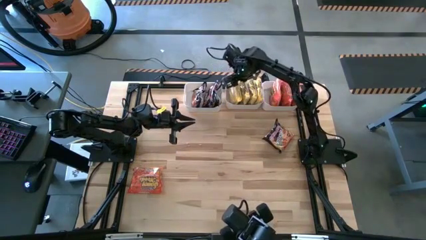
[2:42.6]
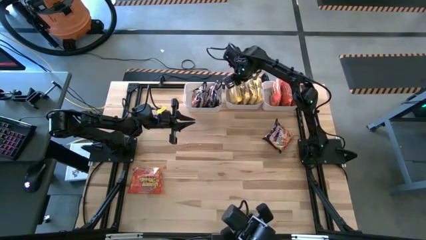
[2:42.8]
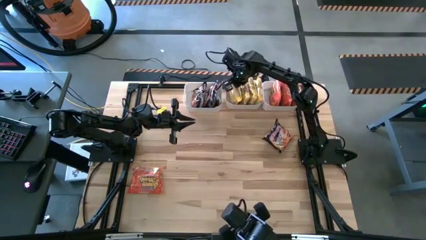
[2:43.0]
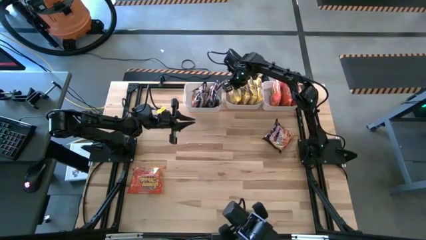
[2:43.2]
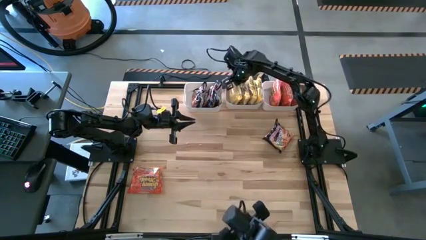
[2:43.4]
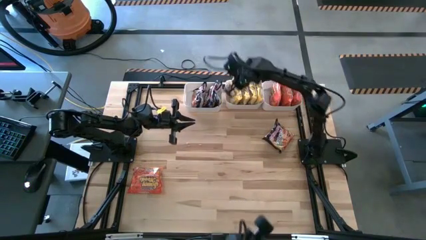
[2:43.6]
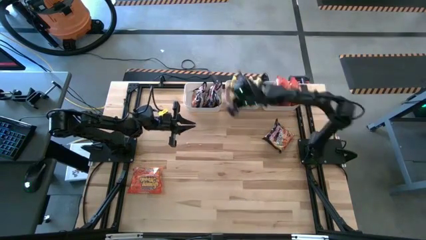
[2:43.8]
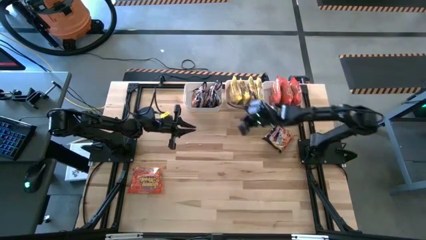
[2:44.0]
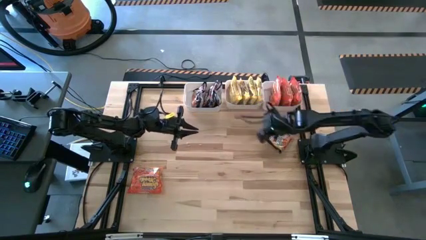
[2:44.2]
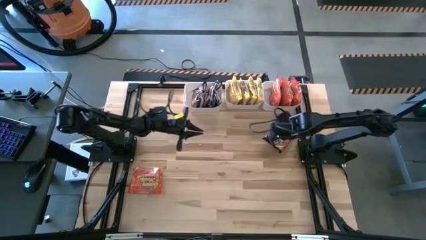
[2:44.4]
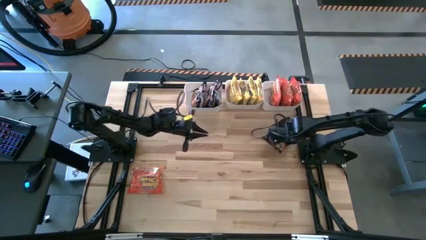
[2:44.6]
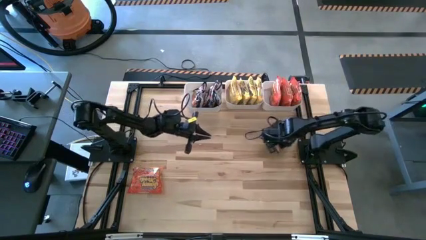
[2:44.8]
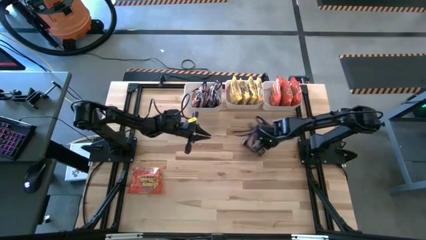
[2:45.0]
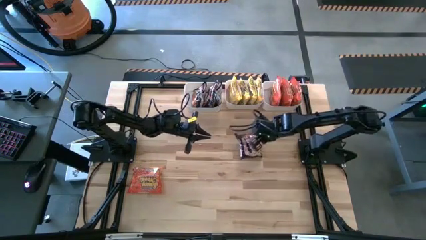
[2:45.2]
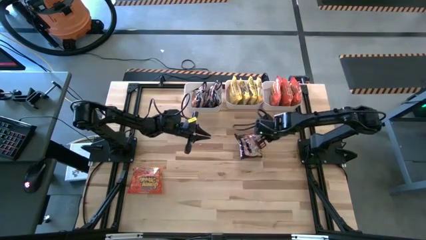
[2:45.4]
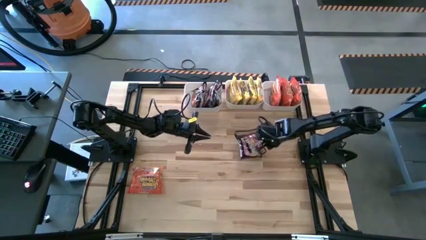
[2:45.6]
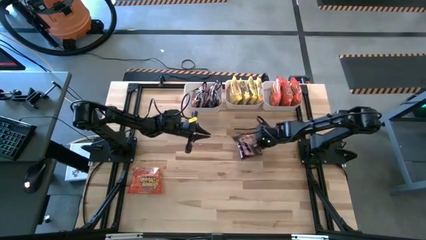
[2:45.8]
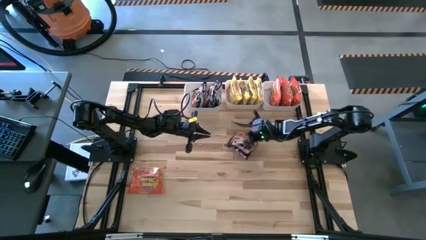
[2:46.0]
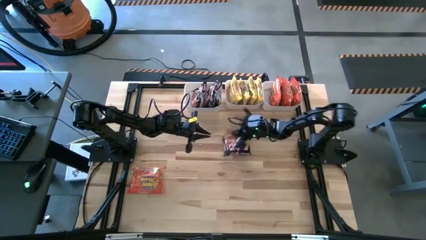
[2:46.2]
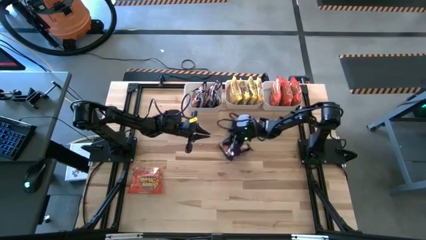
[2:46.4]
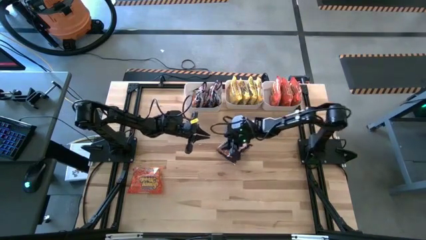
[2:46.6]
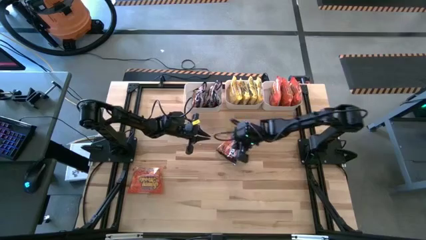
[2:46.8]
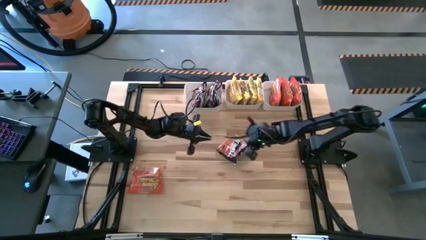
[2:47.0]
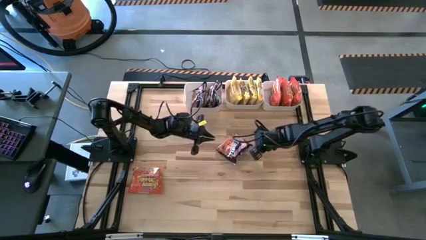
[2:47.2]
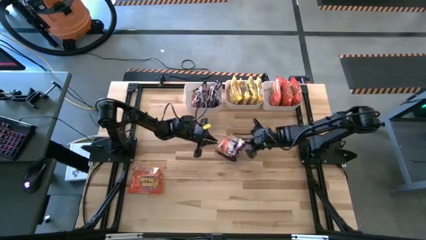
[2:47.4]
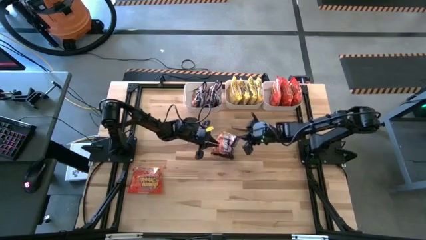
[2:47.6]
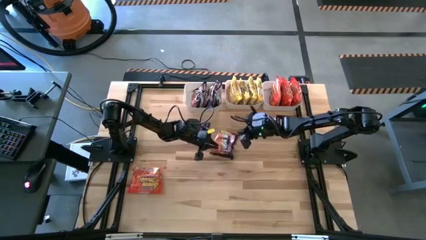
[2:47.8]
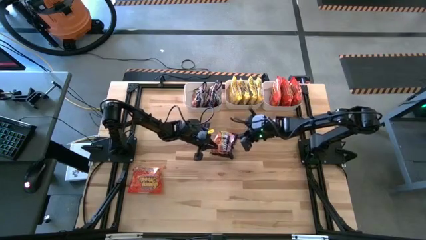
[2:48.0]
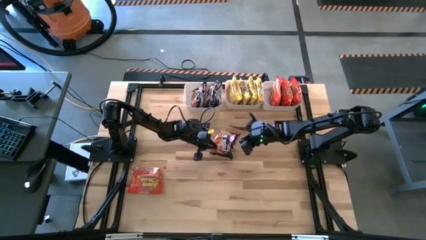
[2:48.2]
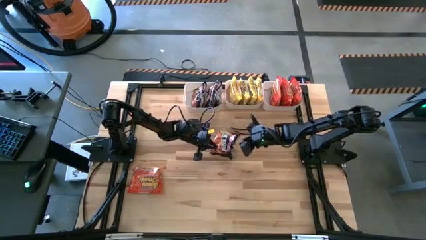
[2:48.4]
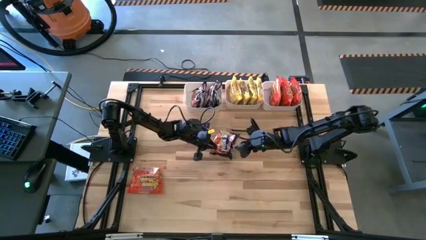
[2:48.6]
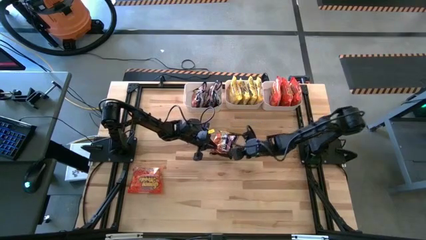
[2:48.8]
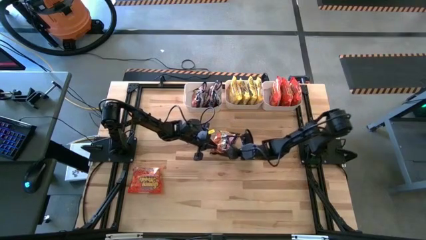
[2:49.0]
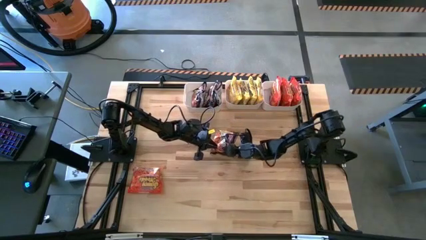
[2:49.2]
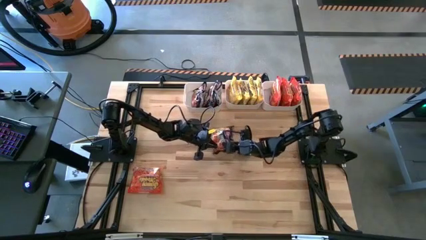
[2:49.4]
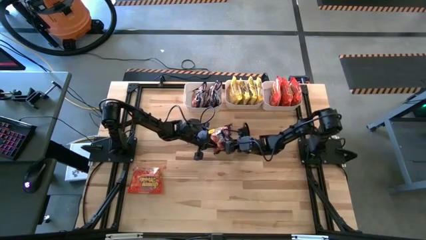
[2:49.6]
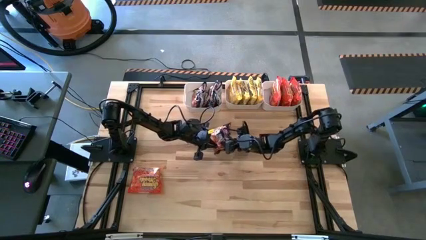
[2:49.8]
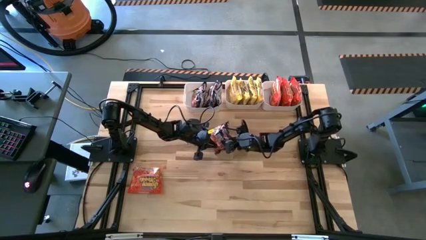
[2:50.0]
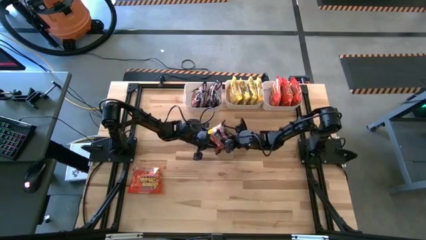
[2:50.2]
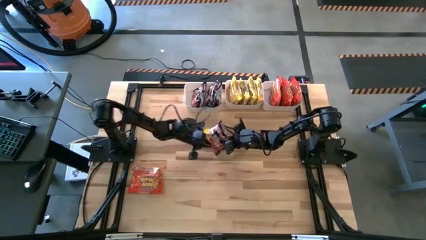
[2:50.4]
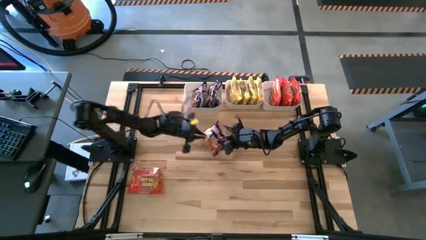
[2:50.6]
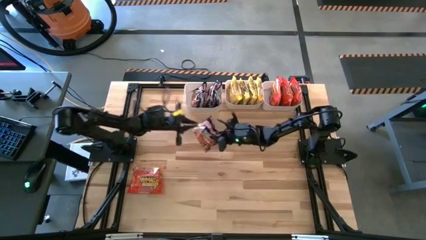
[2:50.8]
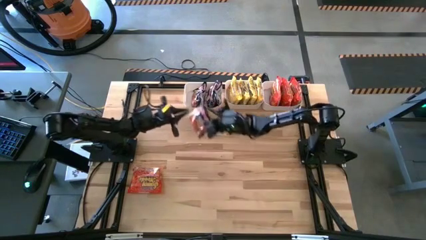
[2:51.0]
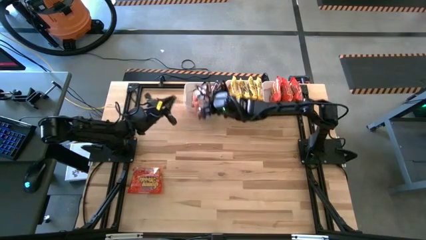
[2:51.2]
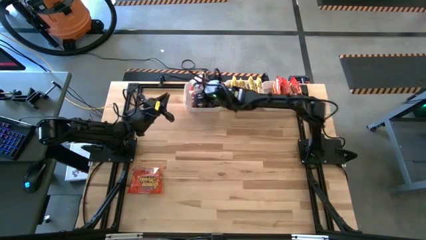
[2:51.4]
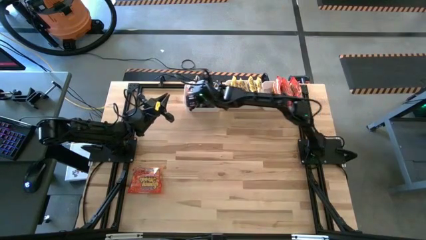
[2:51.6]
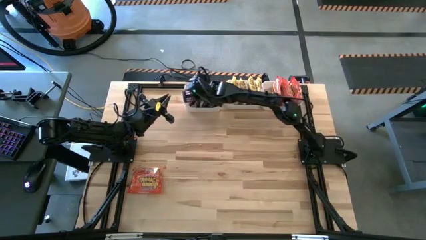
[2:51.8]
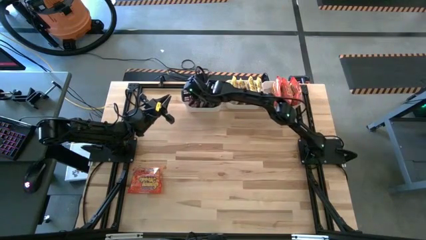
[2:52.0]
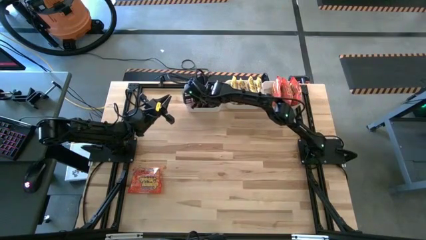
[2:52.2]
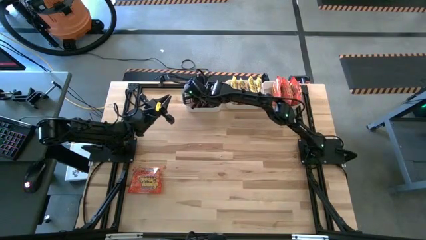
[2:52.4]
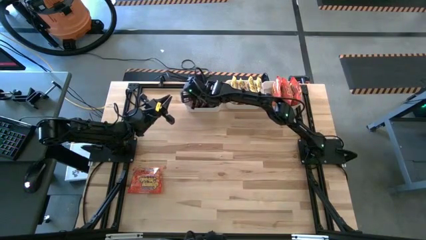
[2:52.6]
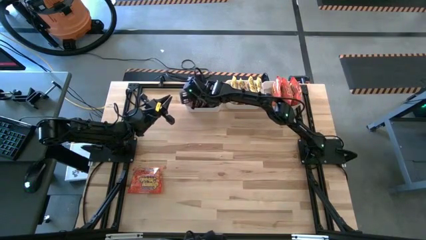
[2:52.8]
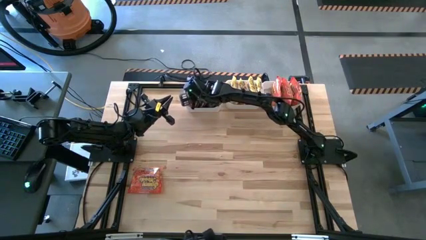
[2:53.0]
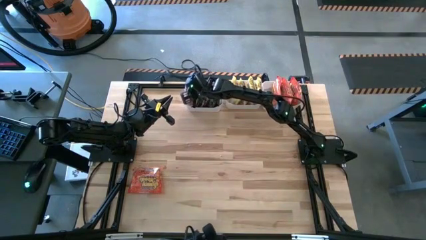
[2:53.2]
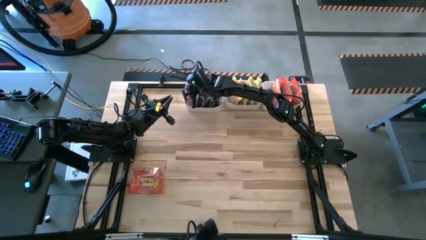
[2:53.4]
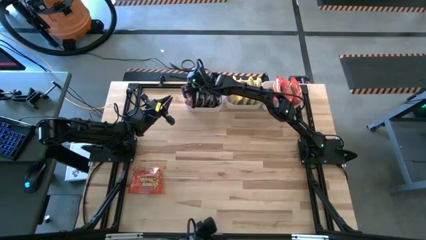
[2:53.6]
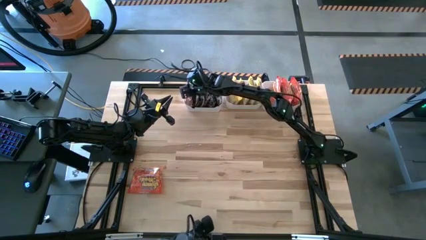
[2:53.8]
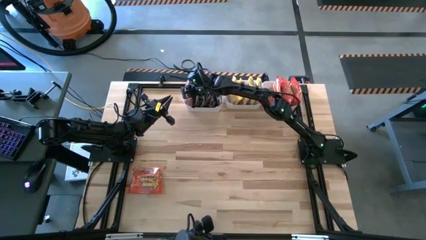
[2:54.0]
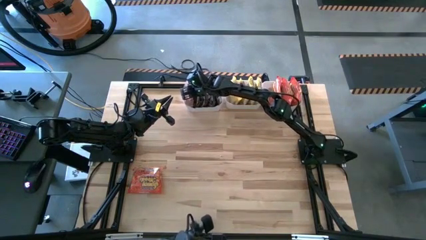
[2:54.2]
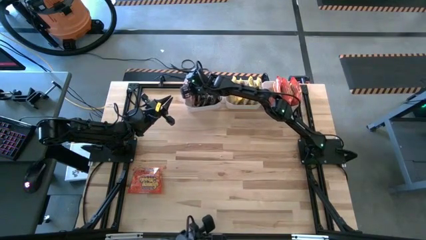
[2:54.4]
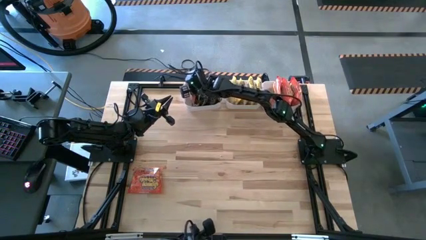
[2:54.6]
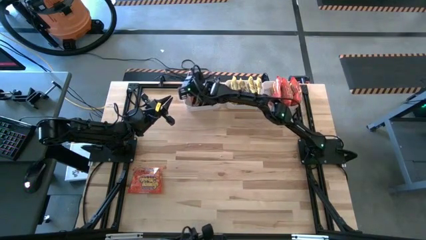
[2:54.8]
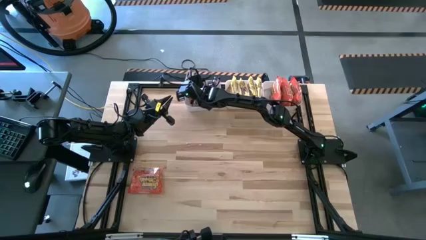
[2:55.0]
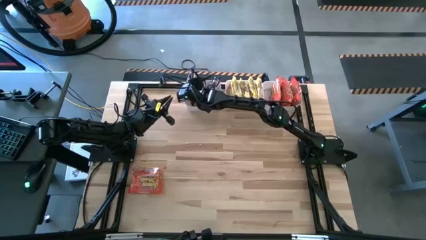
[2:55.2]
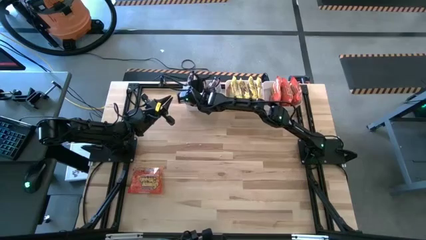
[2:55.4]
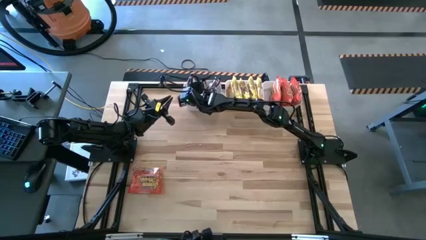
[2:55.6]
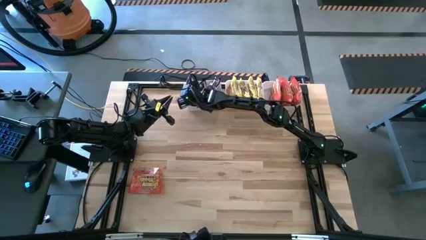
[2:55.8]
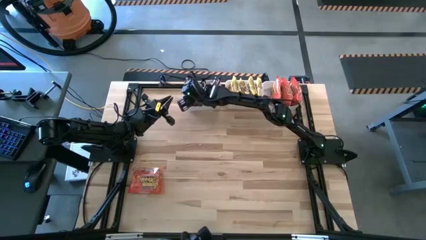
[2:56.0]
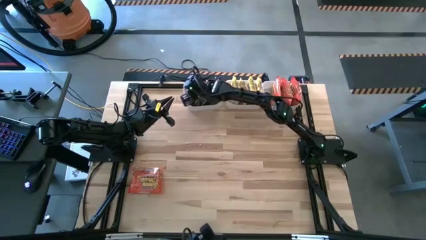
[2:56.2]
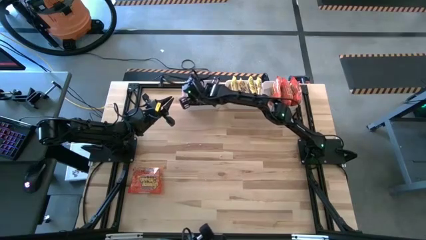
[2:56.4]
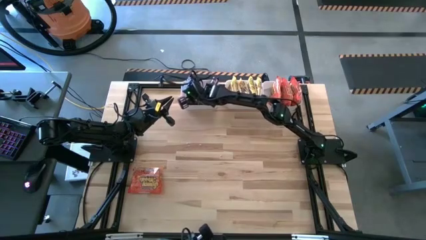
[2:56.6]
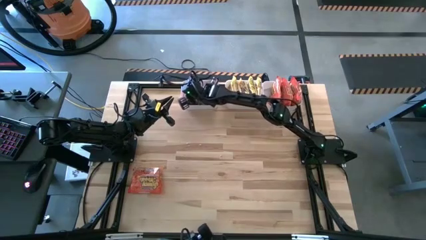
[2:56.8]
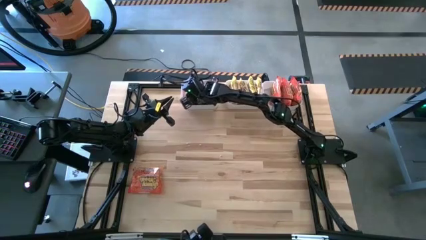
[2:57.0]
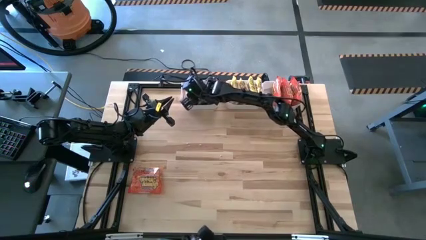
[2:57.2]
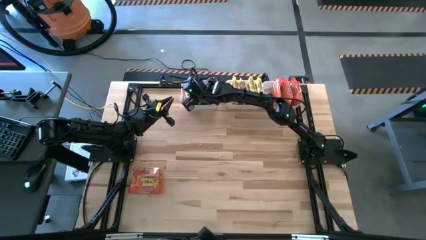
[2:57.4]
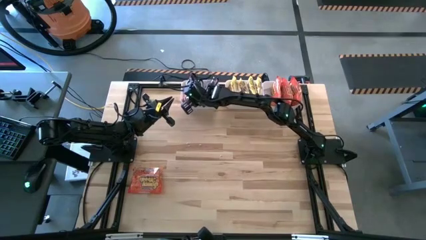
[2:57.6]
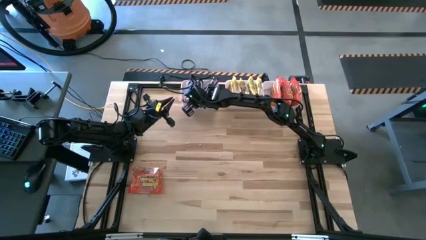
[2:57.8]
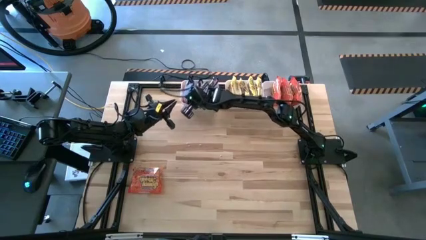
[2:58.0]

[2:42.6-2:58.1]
Task: Sort Maruchan noodles
Put the black noodle into the left white bin

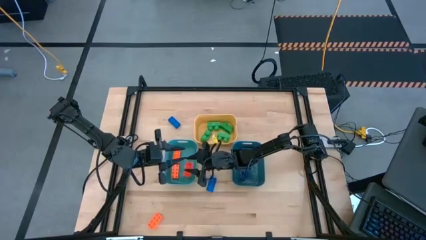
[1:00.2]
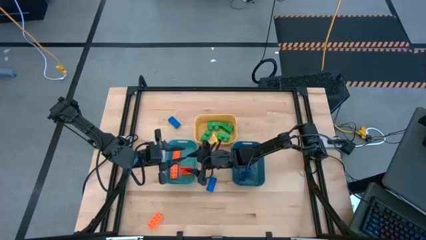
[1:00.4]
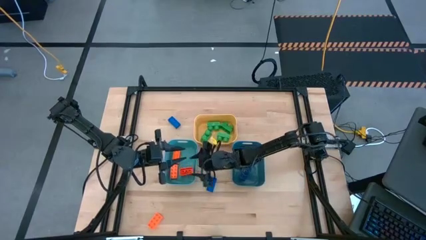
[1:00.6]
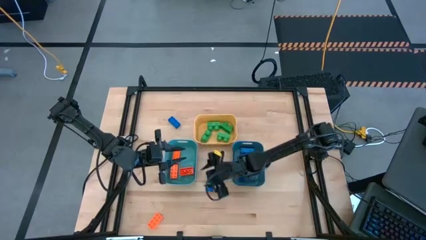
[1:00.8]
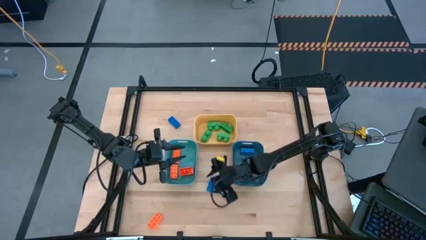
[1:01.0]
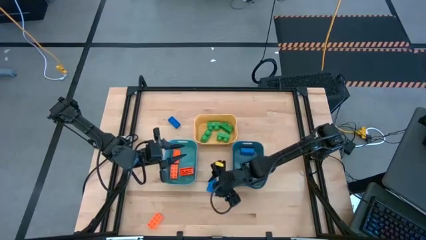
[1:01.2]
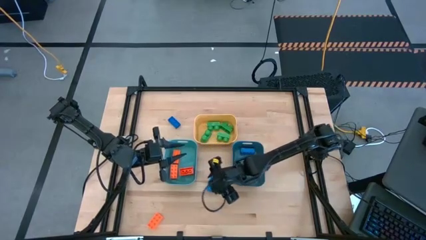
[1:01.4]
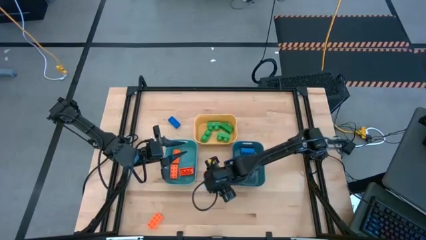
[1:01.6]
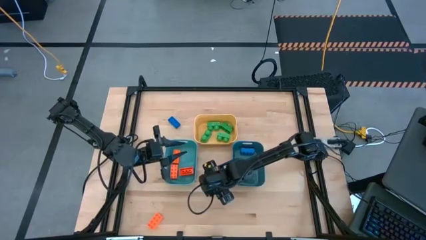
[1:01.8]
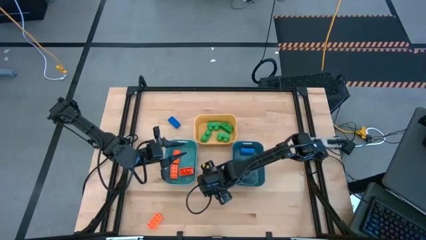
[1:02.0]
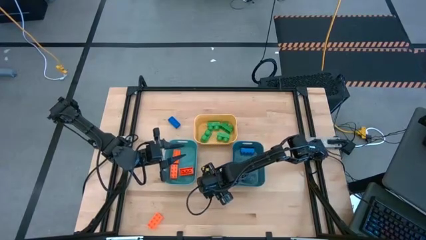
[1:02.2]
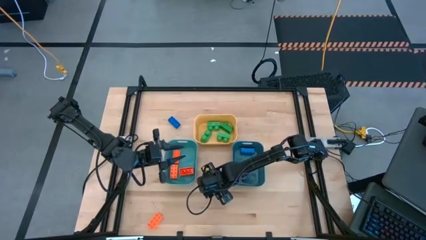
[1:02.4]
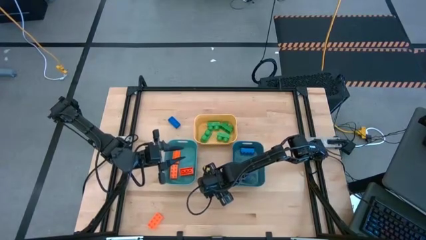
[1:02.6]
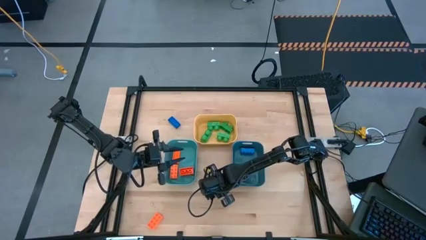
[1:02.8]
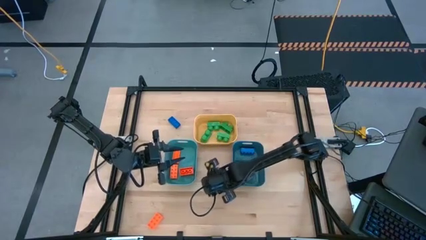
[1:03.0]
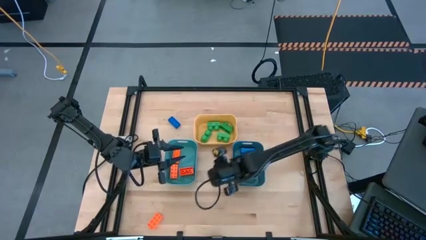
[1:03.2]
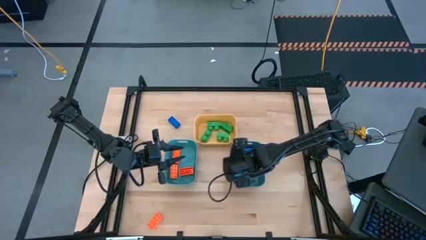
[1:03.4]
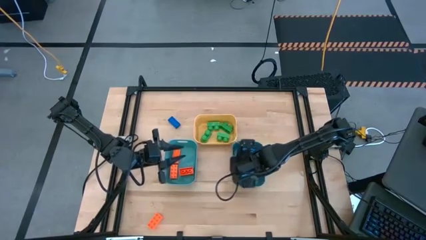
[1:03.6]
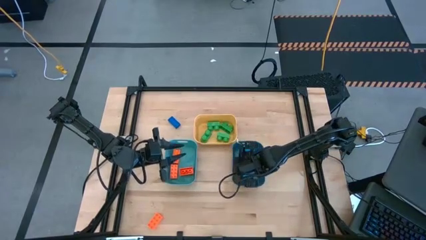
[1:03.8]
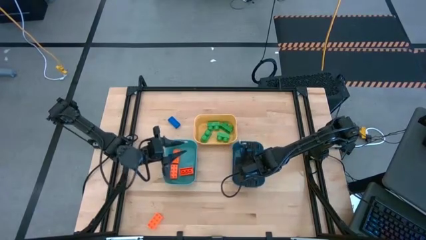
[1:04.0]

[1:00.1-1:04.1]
Task: Sort & place blocks by color
Put the blue game piece into the blue bin
